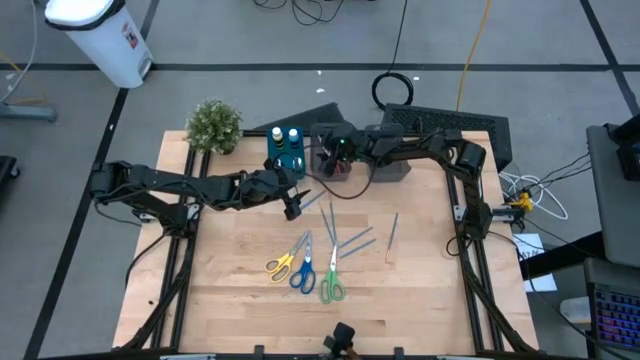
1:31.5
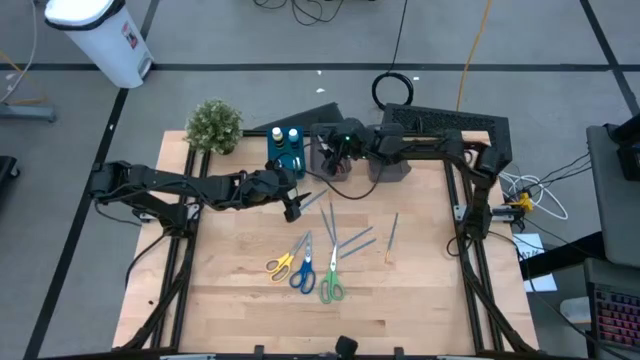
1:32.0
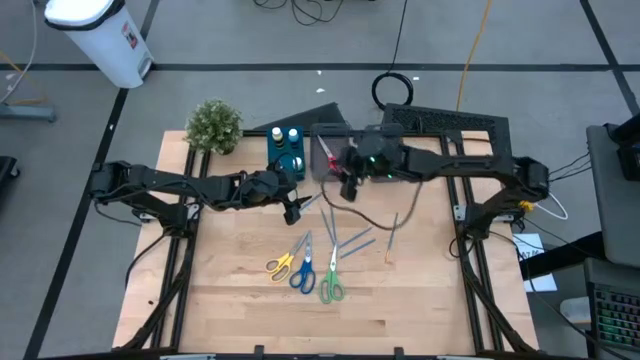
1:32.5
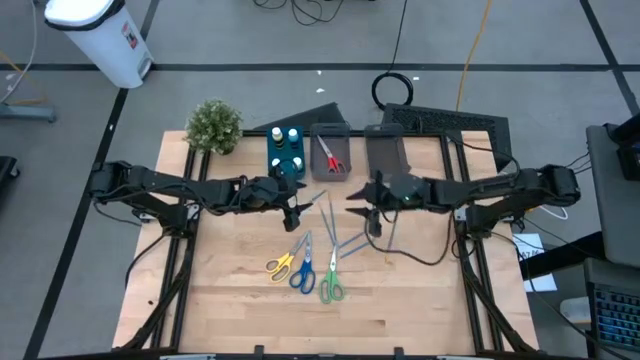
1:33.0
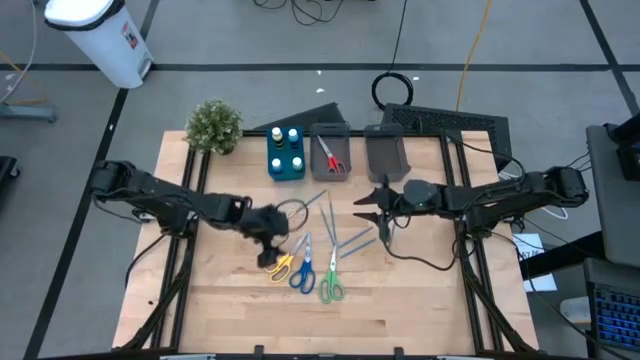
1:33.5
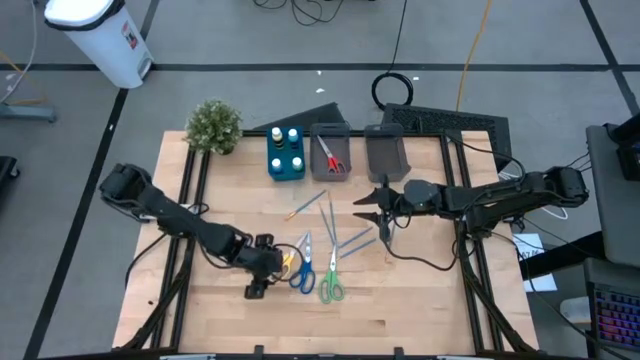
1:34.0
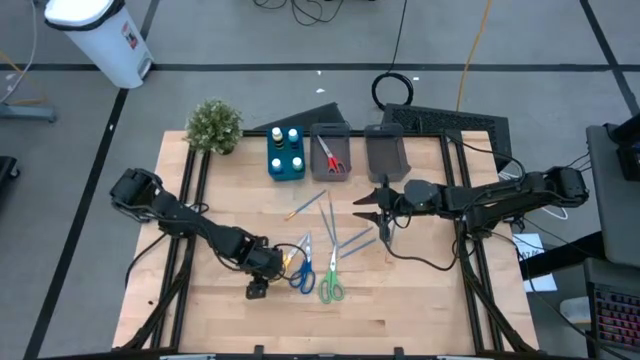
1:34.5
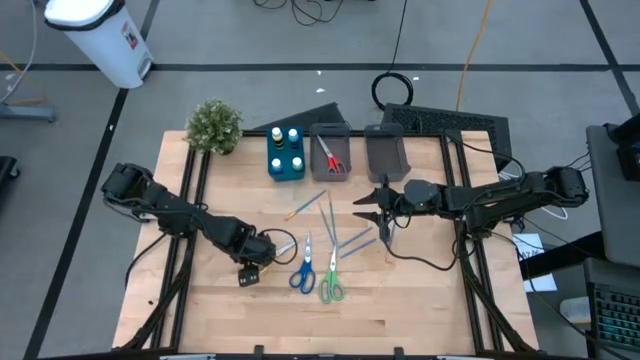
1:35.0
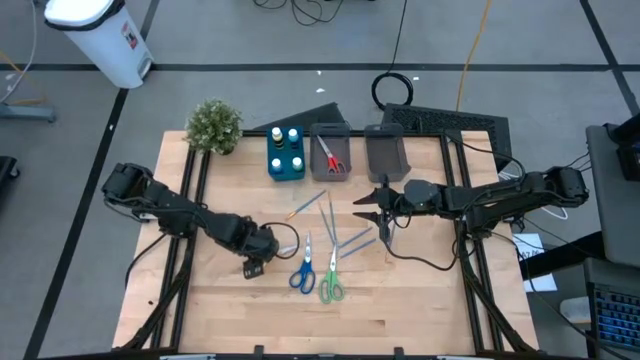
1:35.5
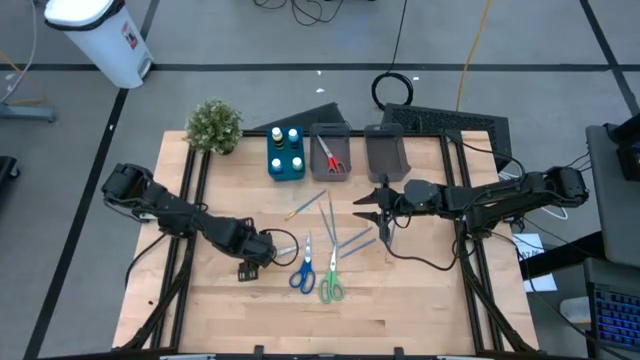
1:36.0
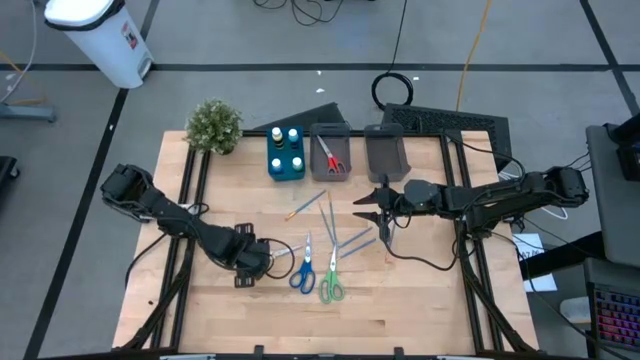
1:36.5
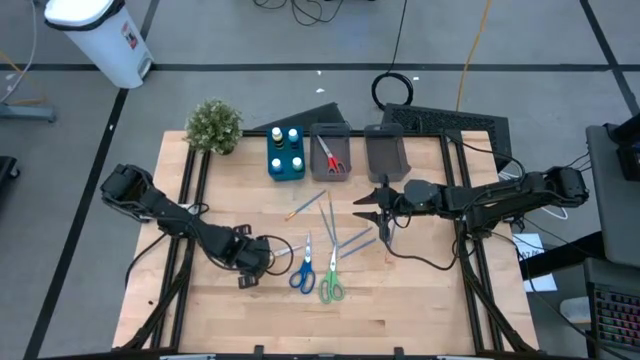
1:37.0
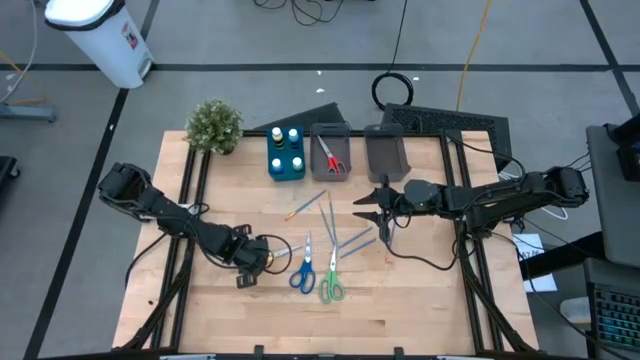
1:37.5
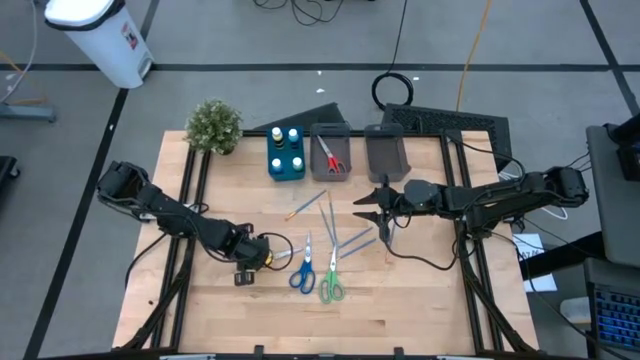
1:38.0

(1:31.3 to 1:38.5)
Task: Pick & Place Paint Supplies
Put the yellow scissors into the left black bin

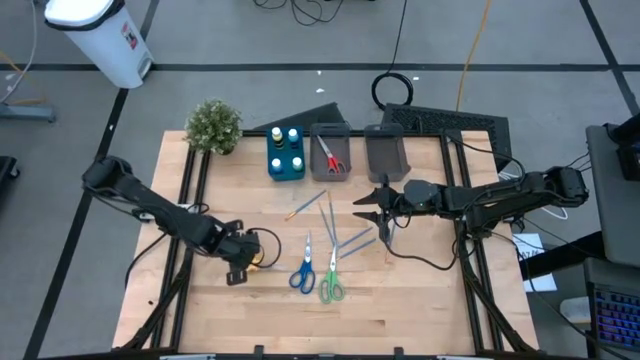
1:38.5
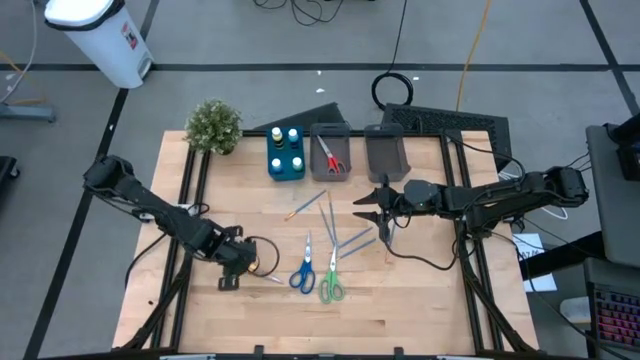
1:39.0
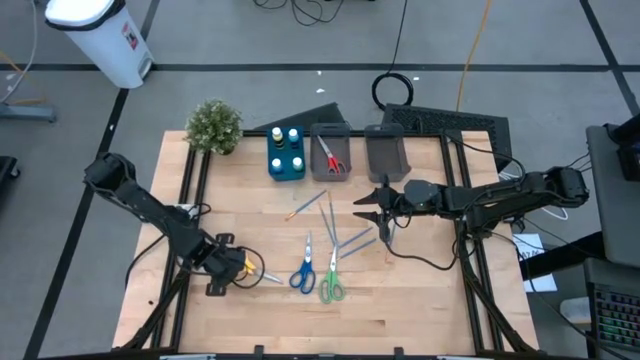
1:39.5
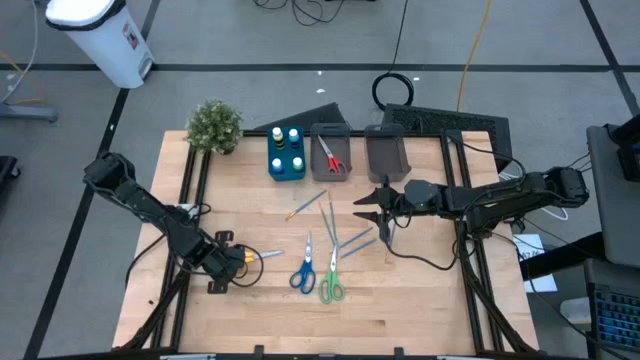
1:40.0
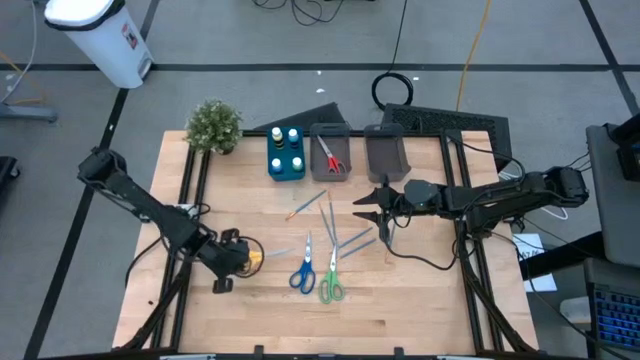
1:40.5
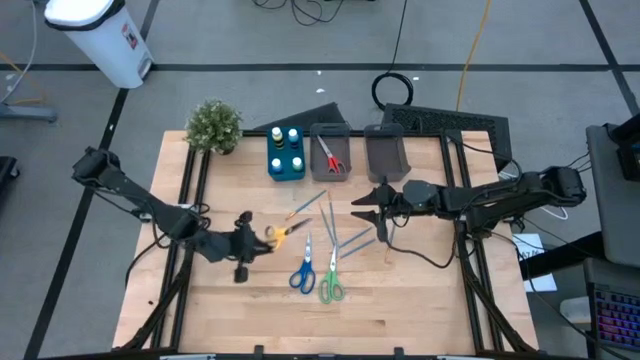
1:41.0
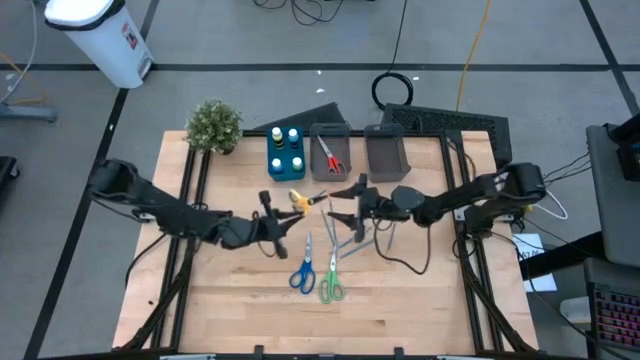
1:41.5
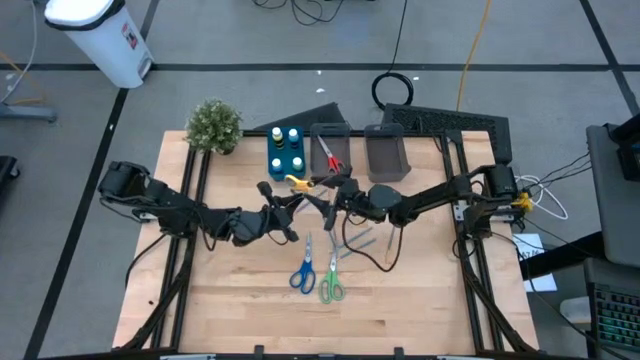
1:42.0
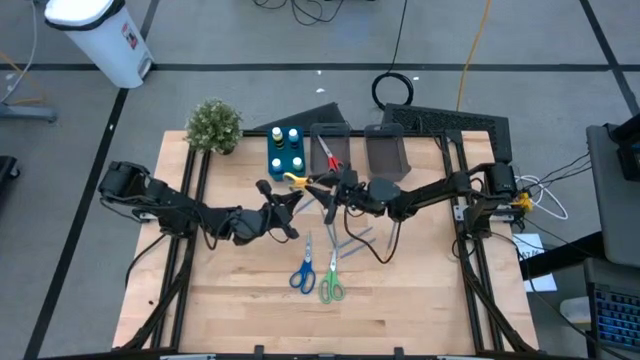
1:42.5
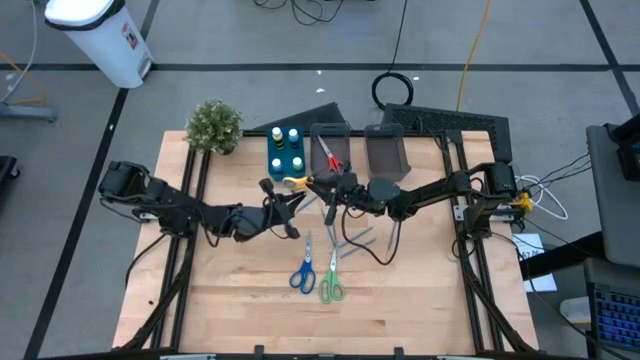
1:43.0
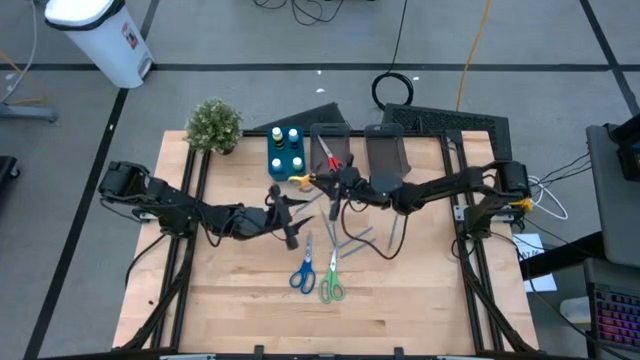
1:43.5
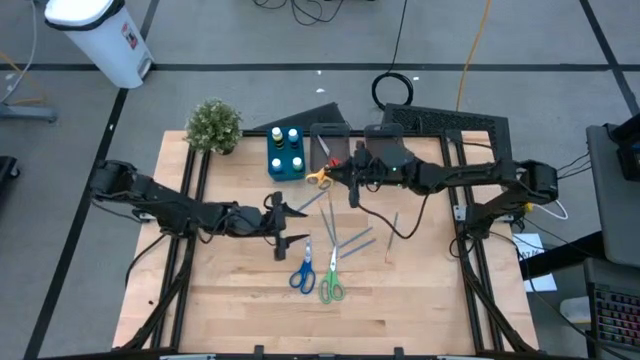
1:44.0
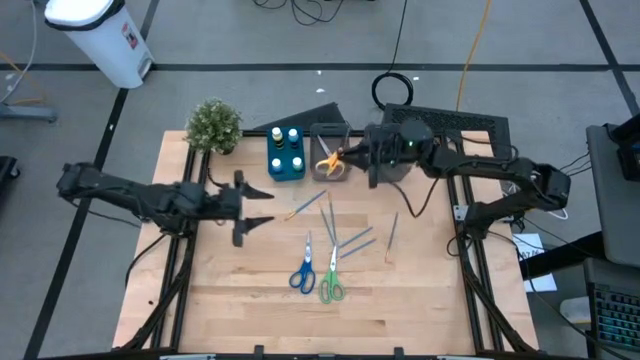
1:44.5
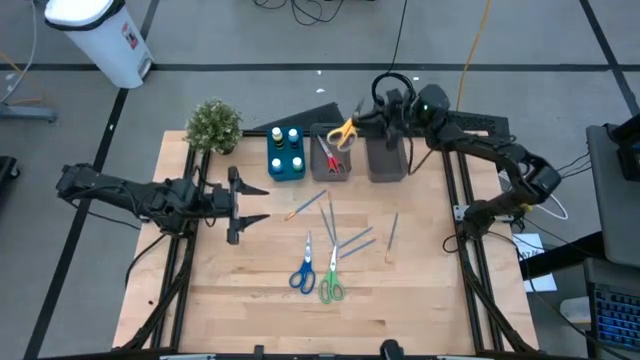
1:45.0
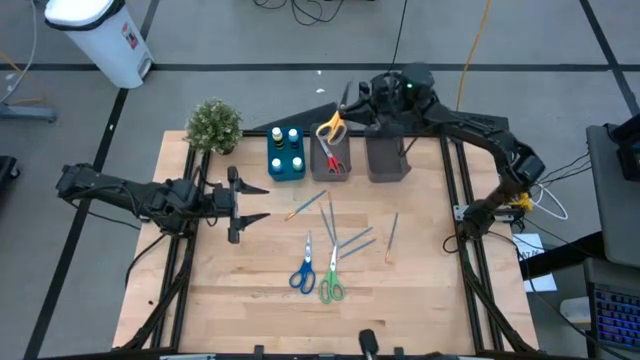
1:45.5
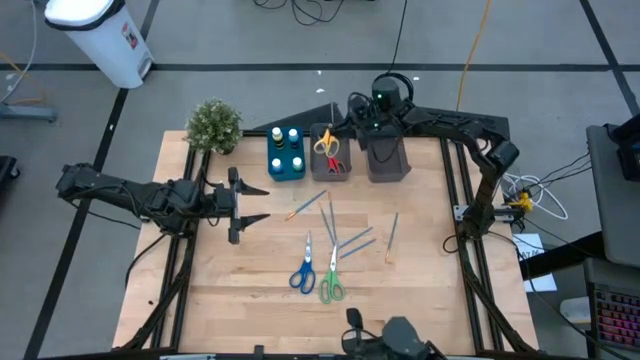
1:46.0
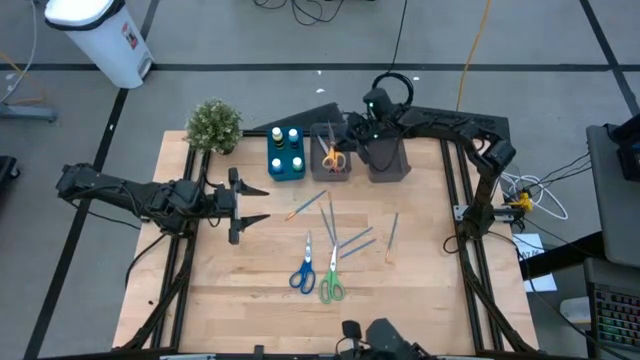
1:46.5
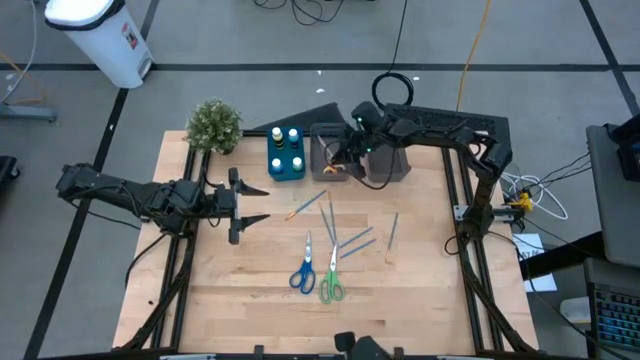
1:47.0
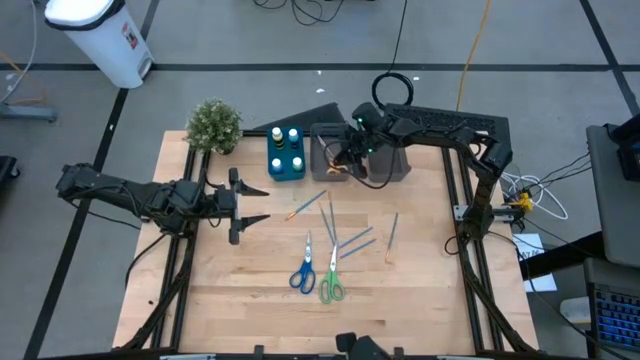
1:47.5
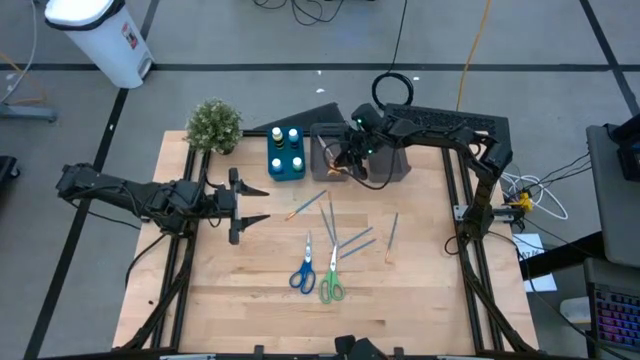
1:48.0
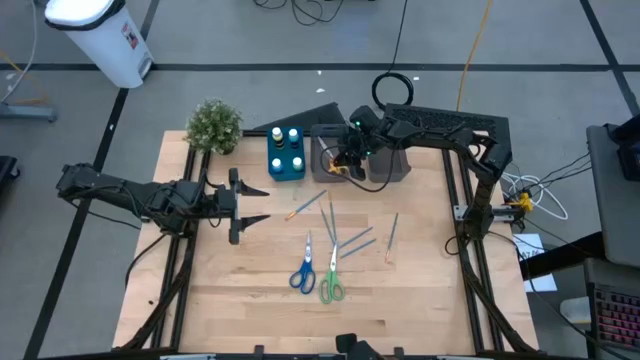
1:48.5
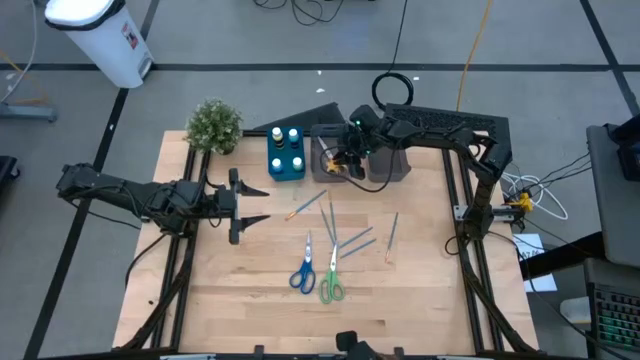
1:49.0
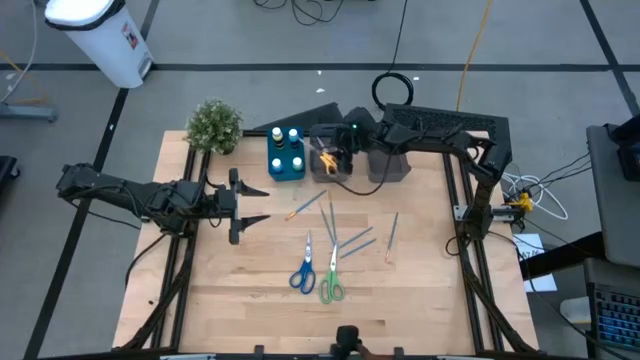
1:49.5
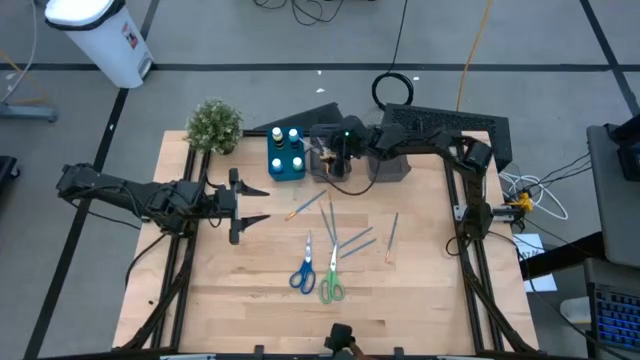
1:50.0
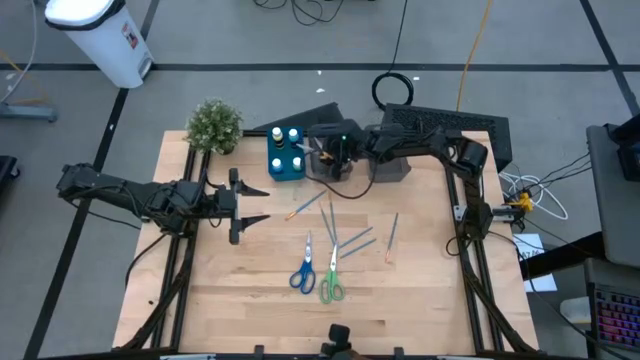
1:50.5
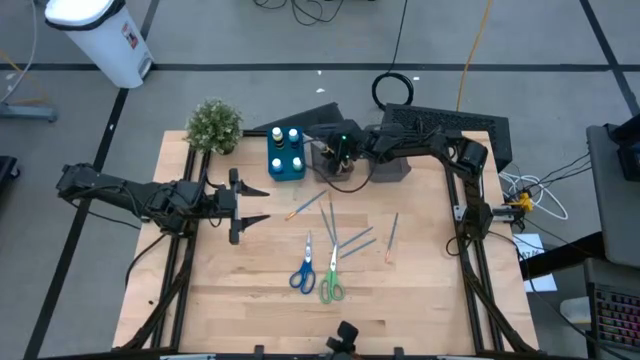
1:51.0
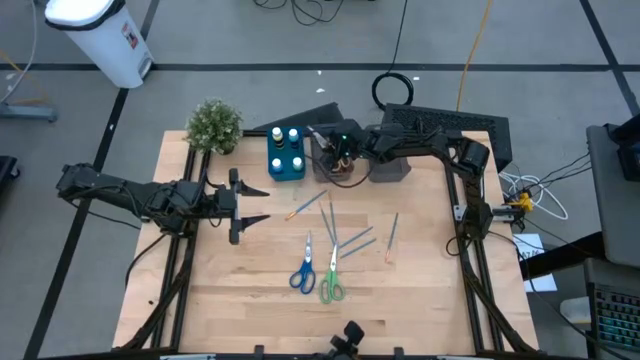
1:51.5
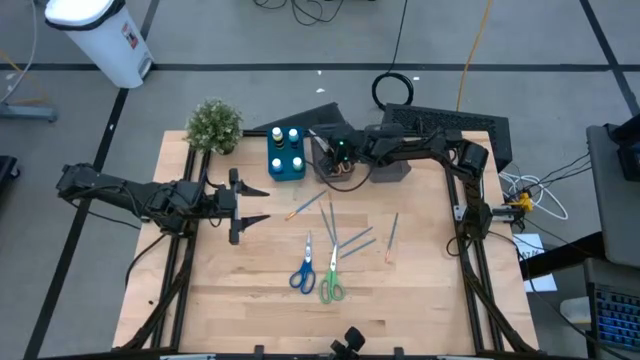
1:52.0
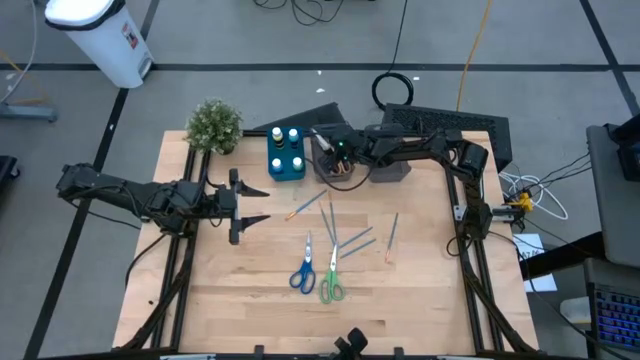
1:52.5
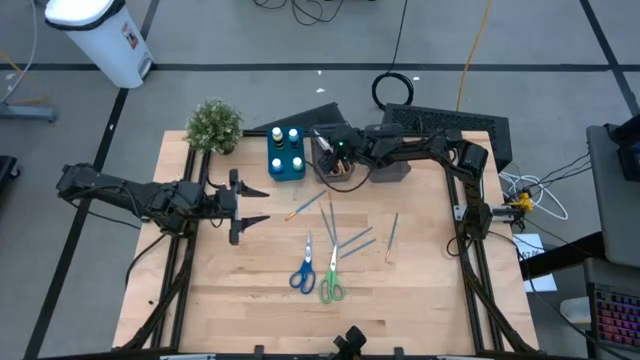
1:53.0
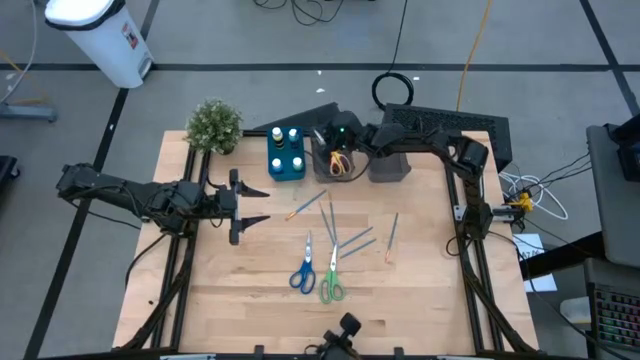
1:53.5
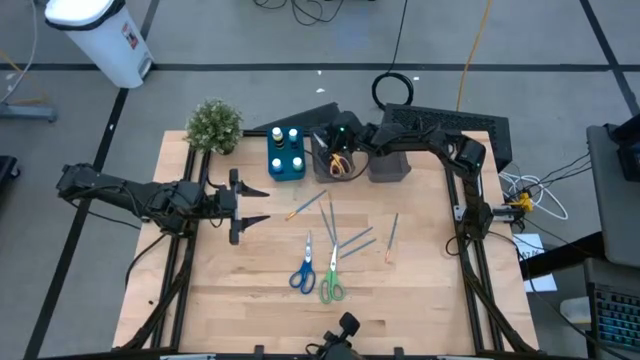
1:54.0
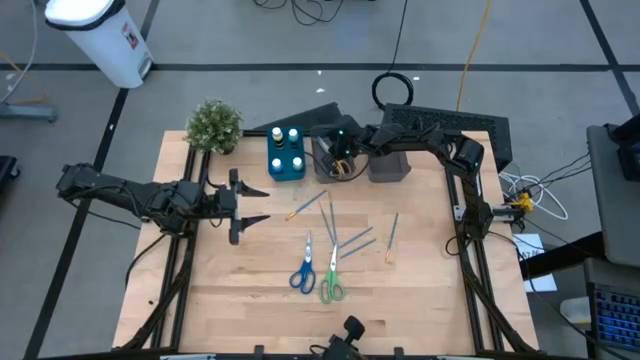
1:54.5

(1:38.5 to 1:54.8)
Put the yellow scissors into the left black bin
